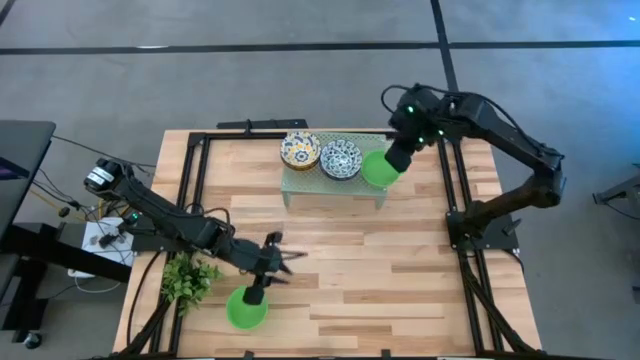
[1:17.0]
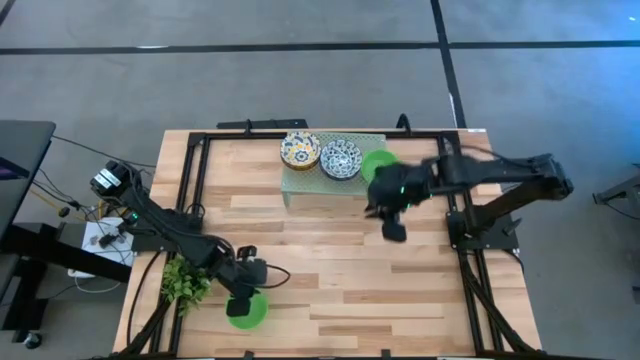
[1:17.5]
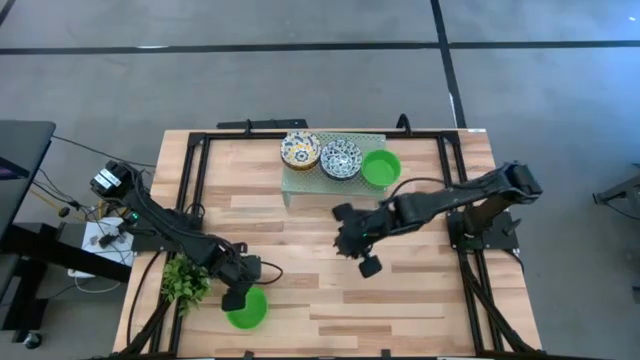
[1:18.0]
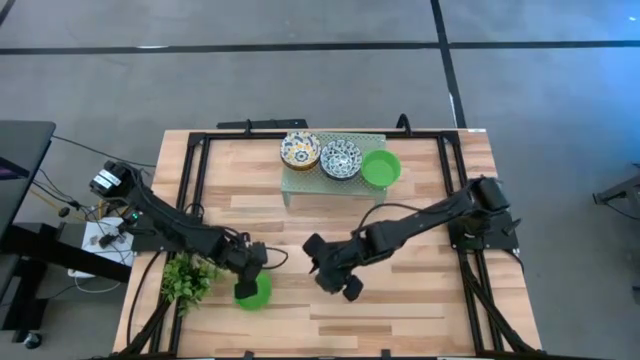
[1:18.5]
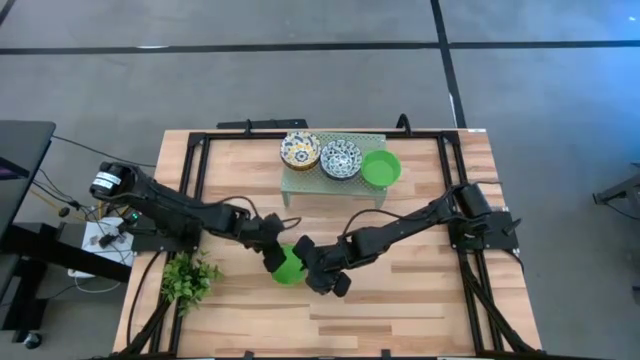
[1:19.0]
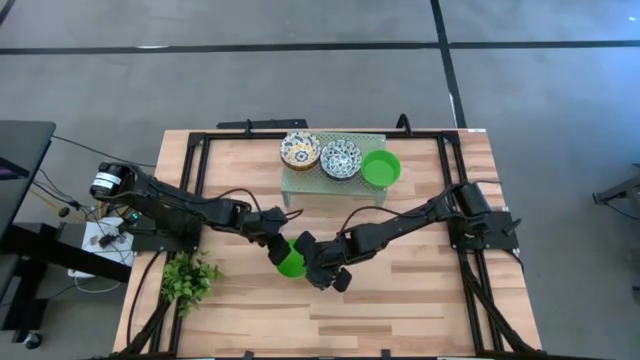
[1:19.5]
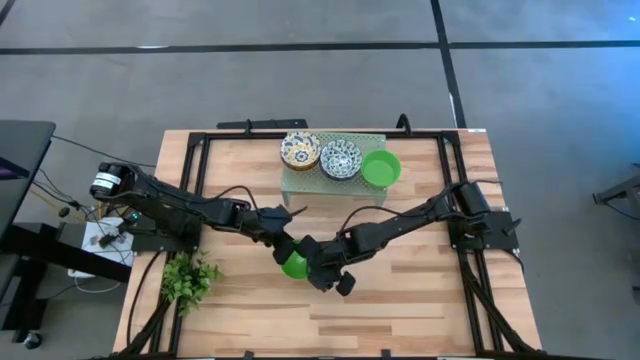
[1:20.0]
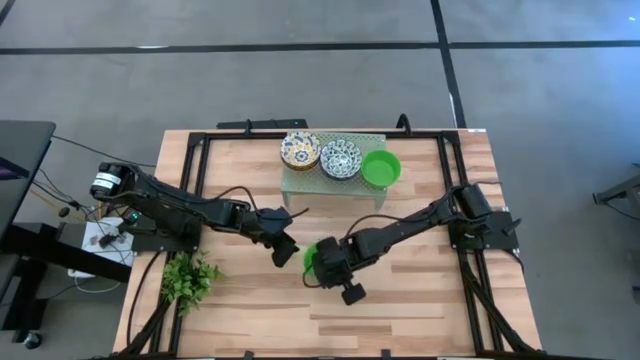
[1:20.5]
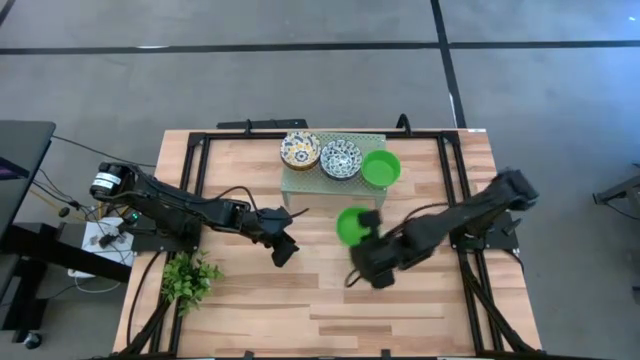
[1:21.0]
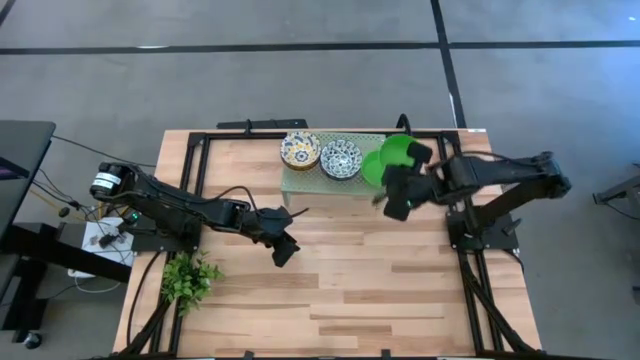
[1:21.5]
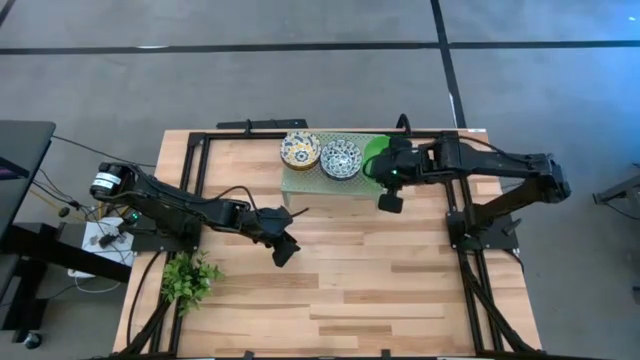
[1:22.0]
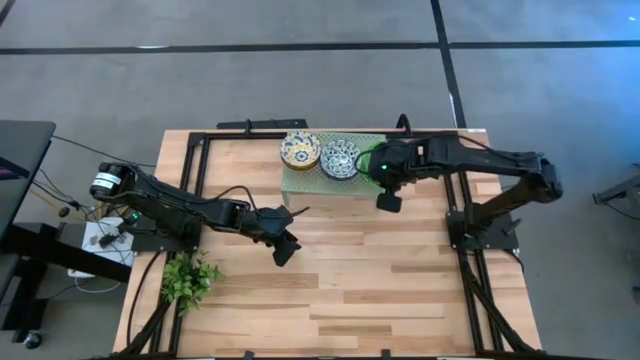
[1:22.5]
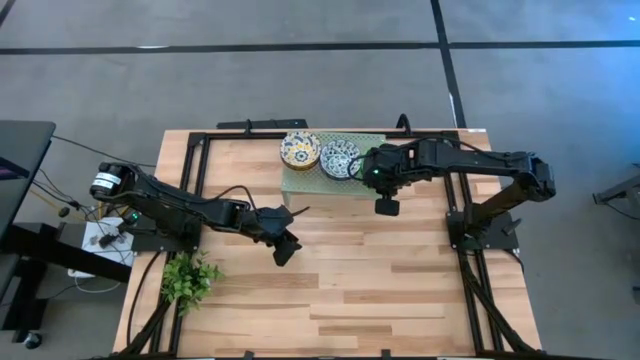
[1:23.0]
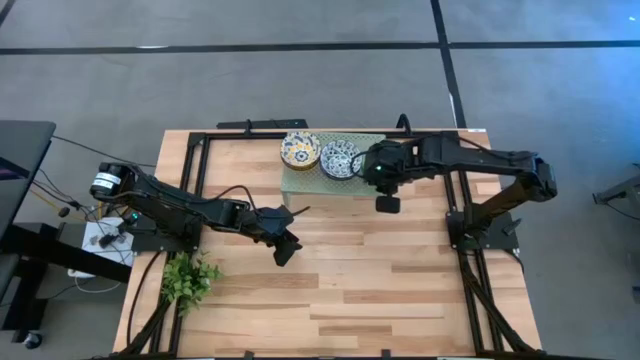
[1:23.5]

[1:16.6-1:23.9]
Task: Pick & Place Mini bowls
Stack the green bowl on the stacked green bowls on the shelf

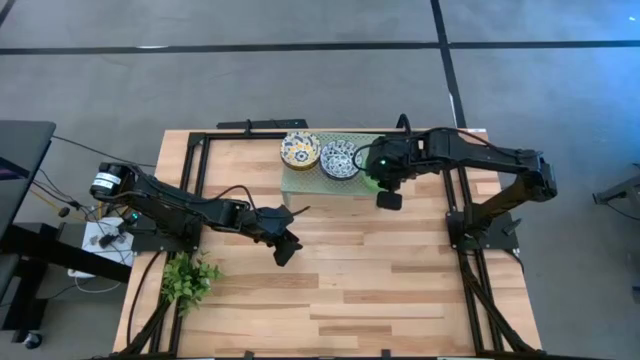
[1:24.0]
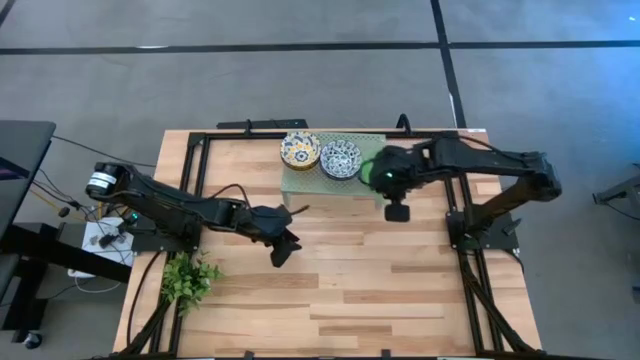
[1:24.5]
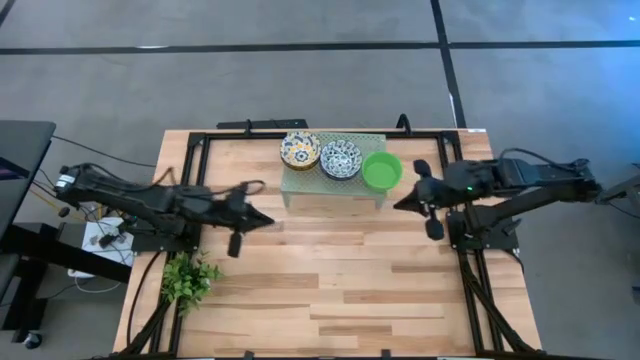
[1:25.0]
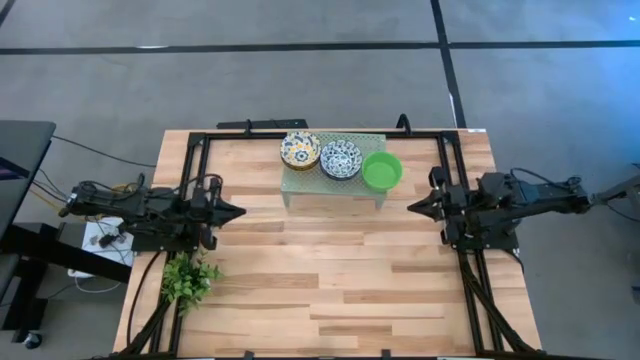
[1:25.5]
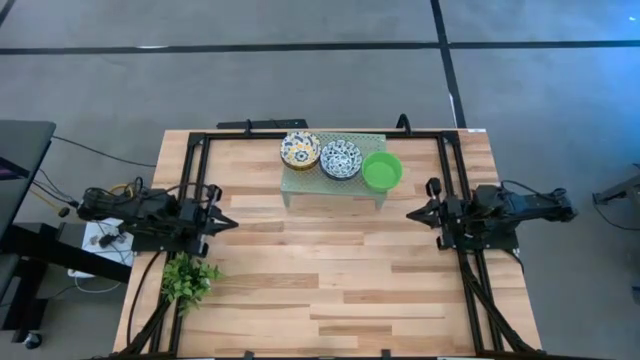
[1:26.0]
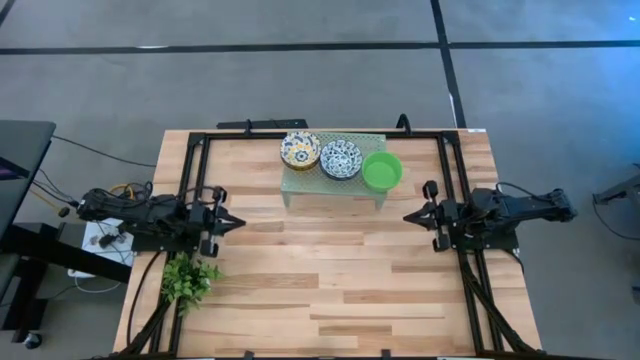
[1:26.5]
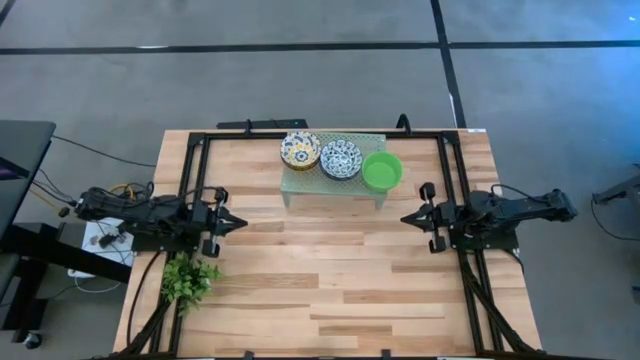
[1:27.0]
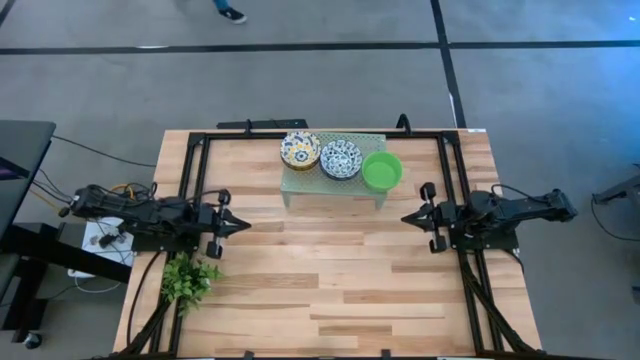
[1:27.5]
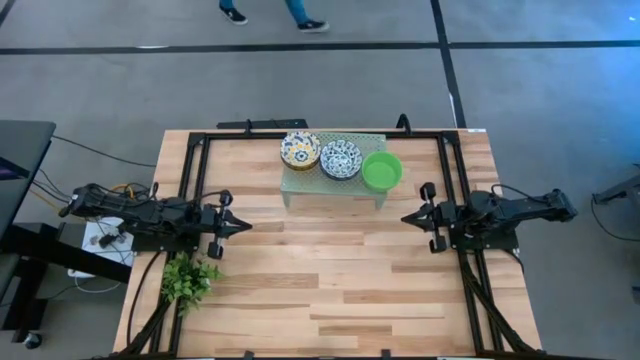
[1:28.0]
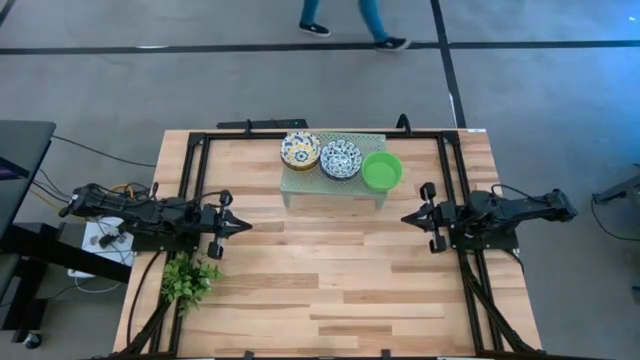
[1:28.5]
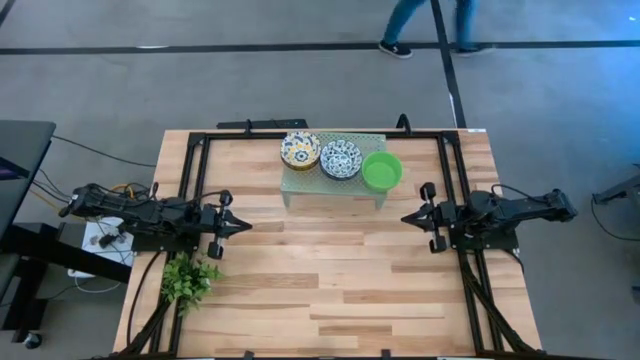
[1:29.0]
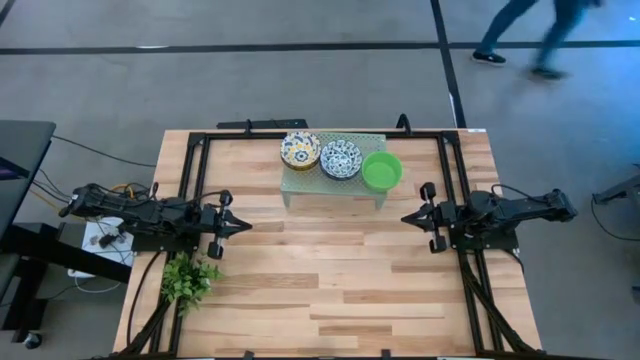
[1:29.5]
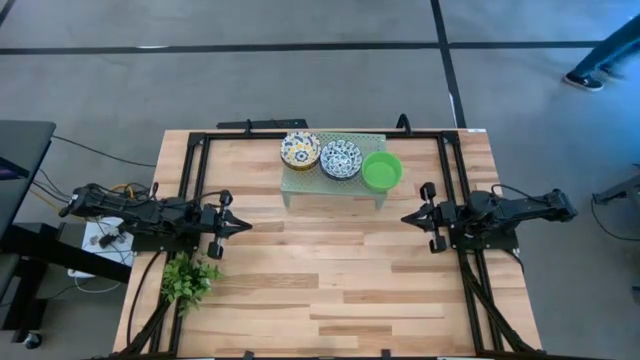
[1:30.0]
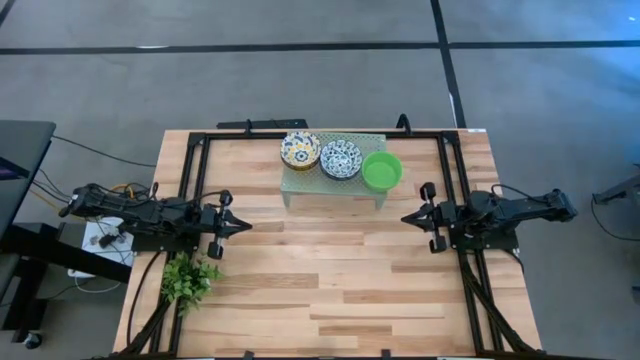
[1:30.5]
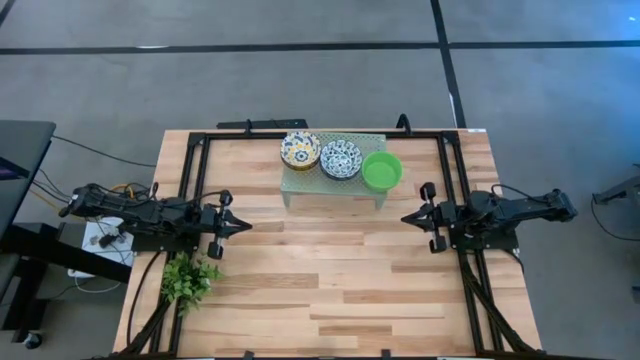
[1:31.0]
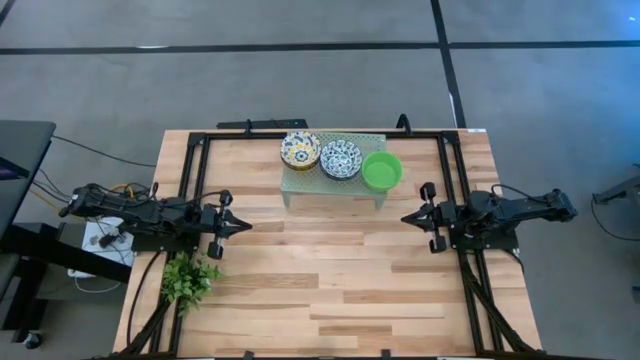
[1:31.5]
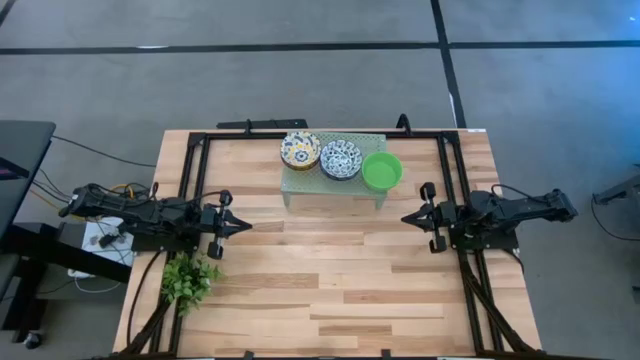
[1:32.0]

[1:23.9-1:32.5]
Return to Home Position

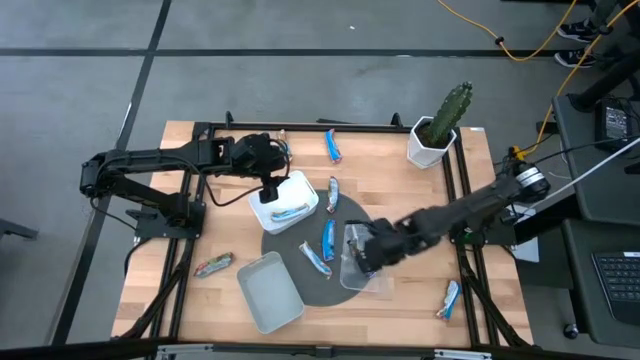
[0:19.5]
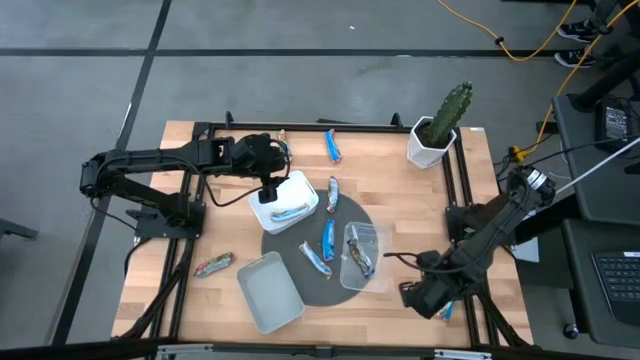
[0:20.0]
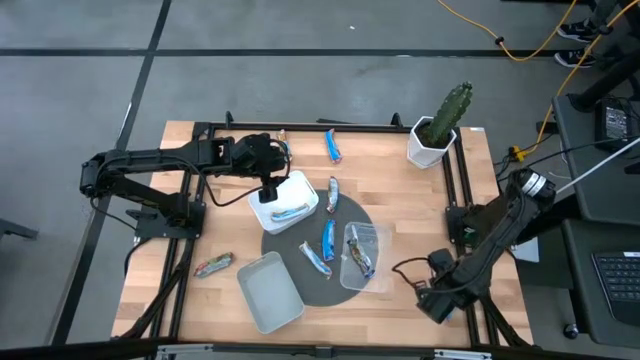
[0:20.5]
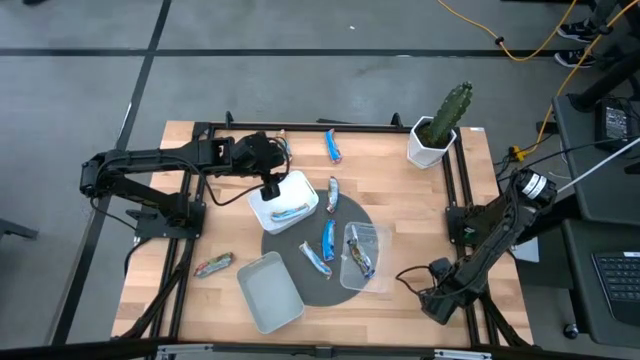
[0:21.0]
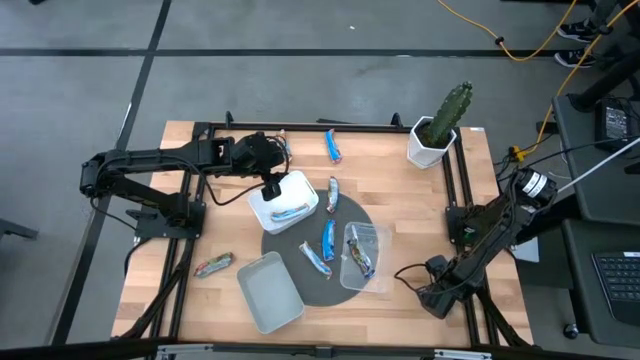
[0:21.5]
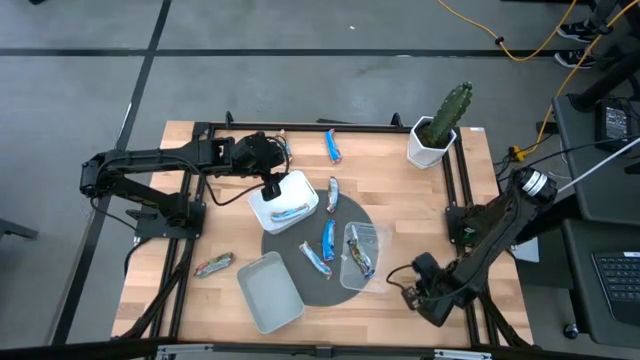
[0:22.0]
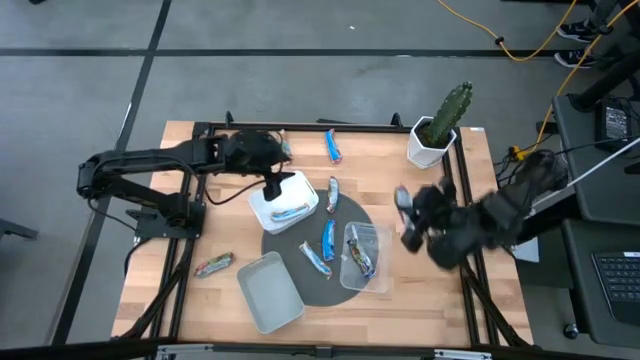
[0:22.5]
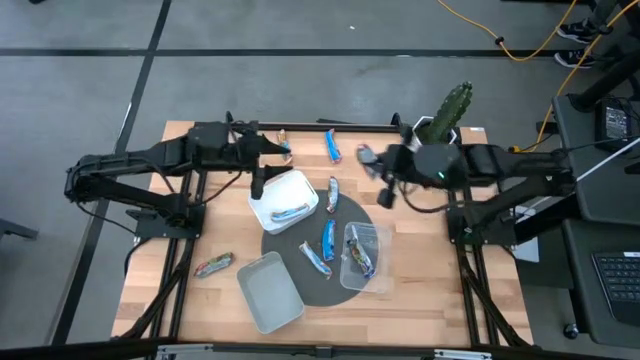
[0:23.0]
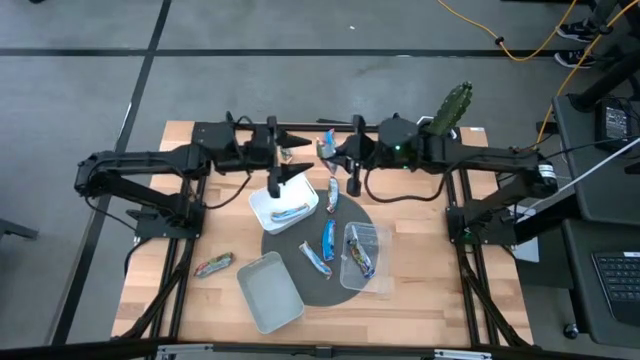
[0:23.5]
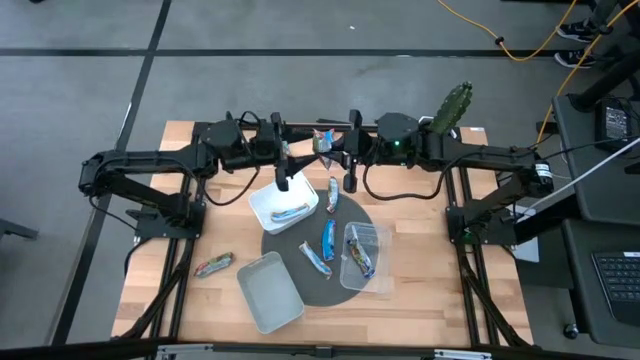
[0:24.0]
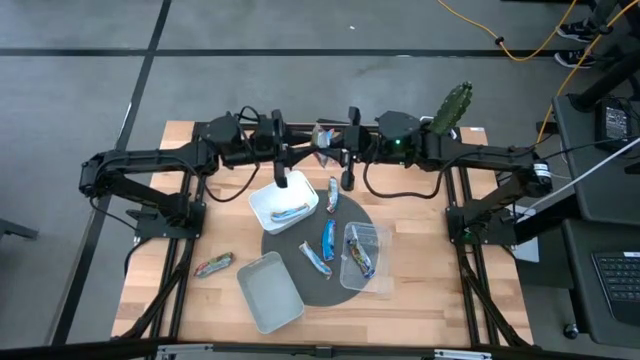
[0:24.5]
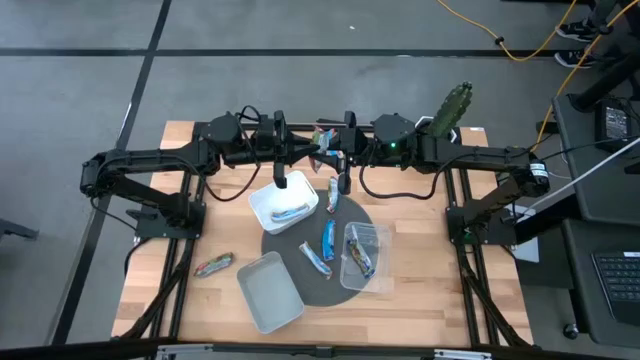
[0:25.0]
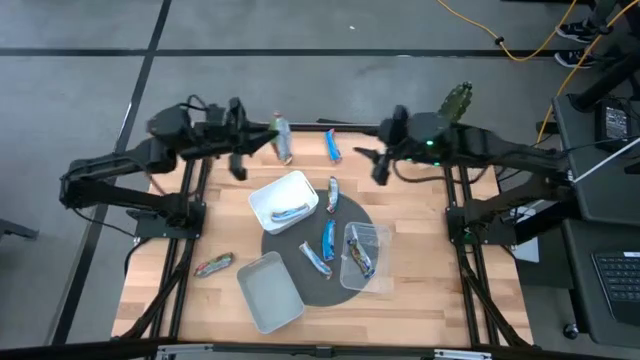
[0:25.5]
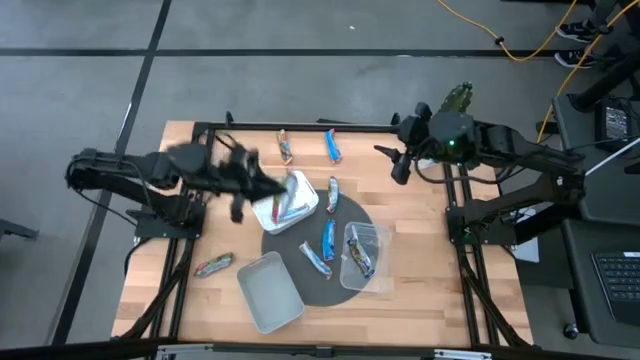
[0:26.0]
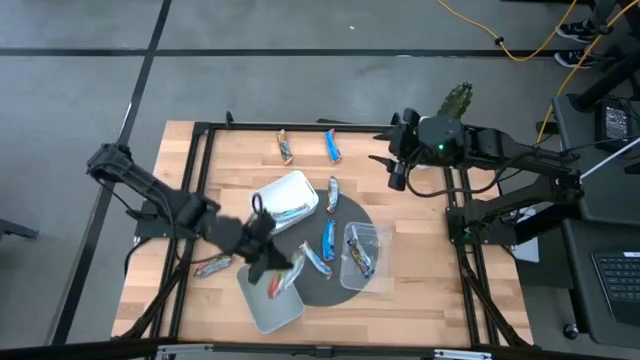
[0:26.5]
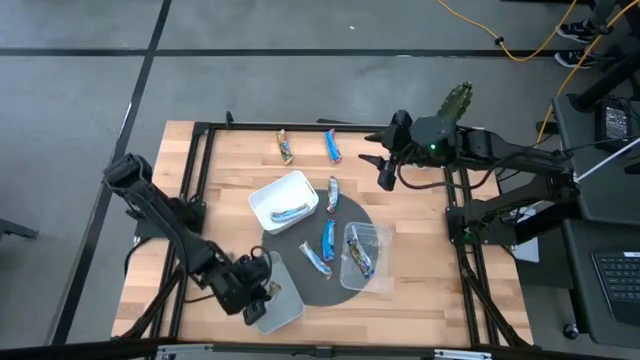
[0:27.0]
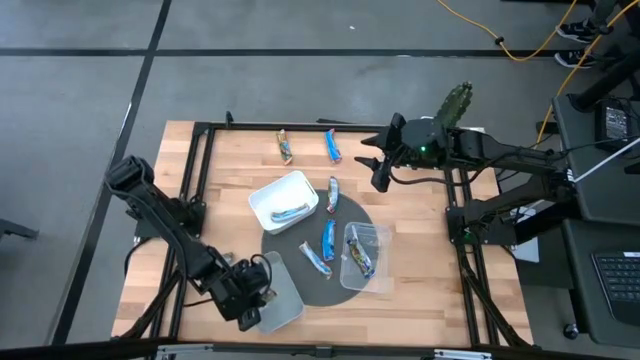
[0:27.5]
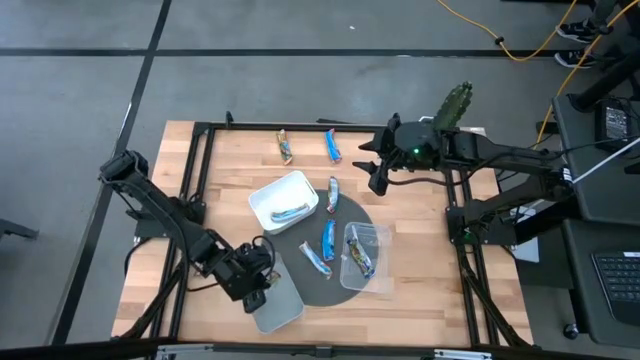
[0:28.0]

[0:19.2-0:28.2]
Task: Pick and place Granola Bars by type
Put the red granola bar into the gray bin
